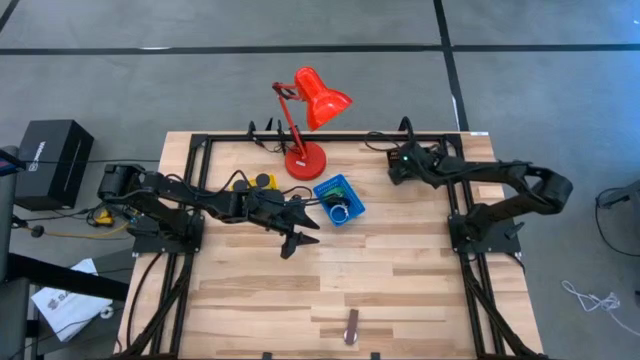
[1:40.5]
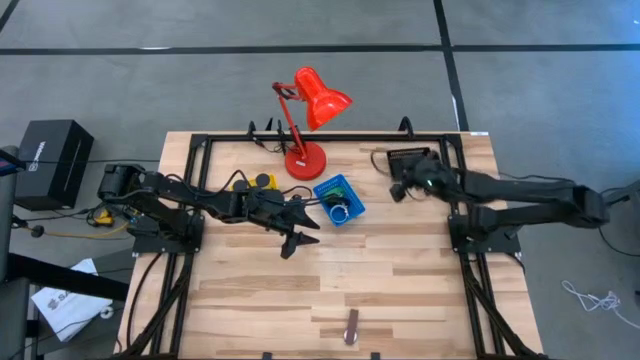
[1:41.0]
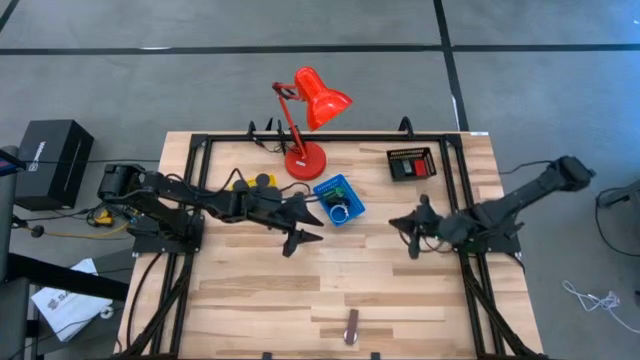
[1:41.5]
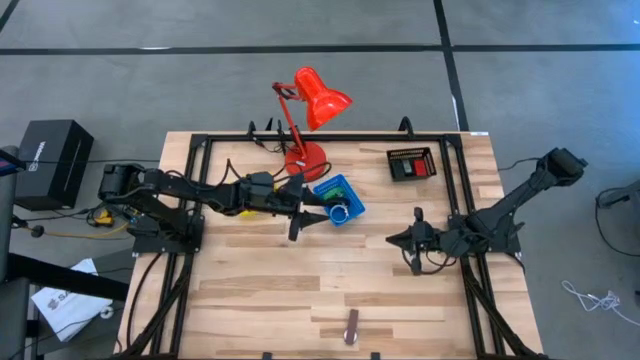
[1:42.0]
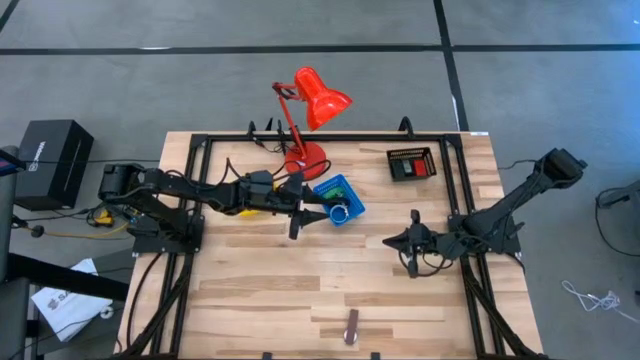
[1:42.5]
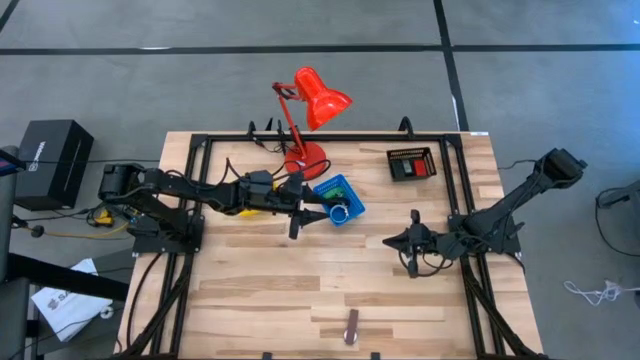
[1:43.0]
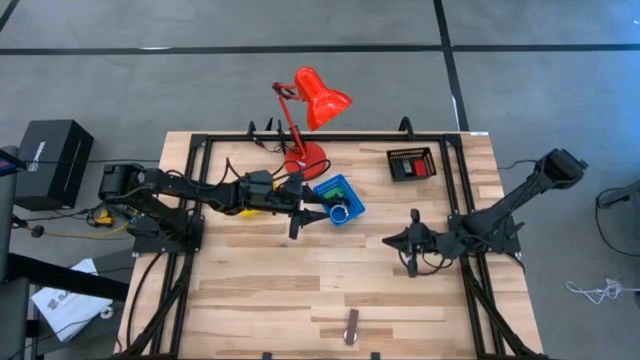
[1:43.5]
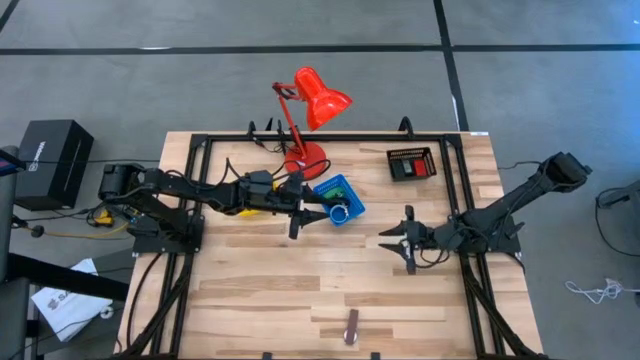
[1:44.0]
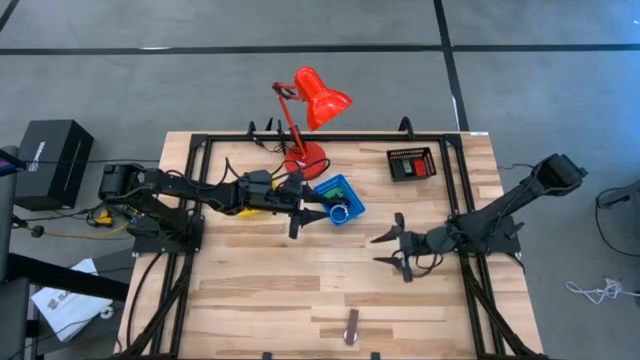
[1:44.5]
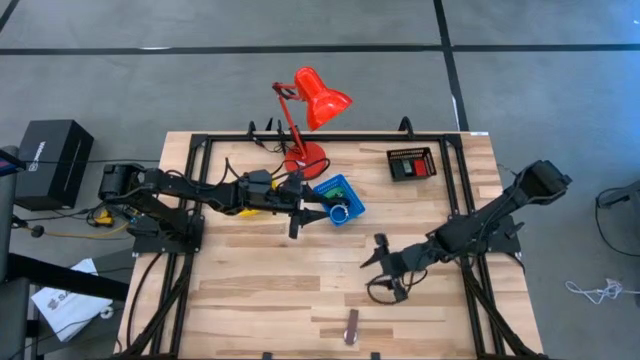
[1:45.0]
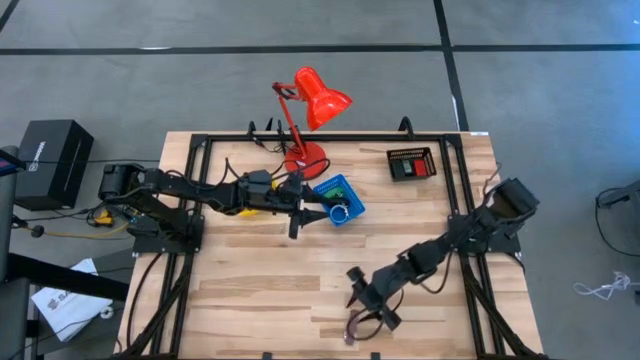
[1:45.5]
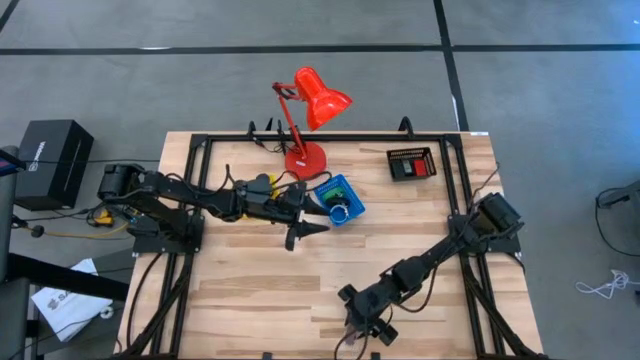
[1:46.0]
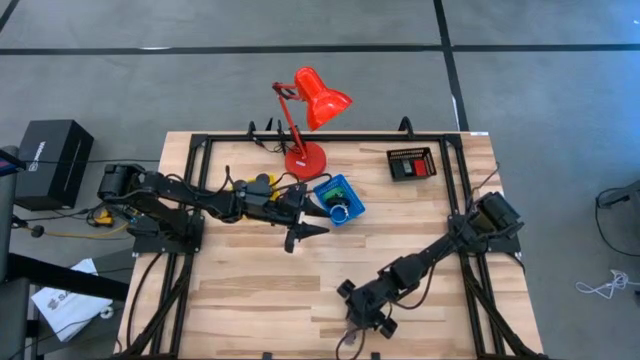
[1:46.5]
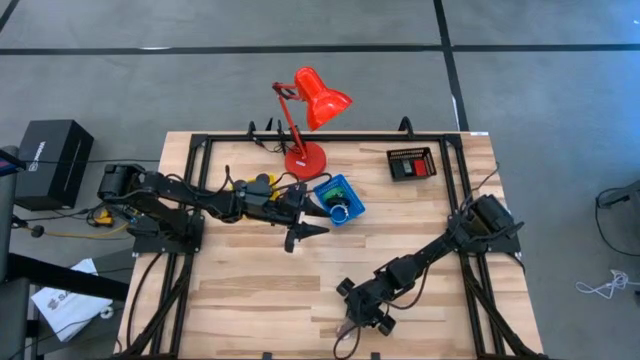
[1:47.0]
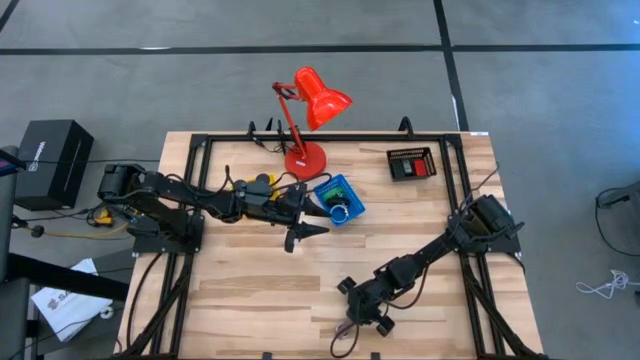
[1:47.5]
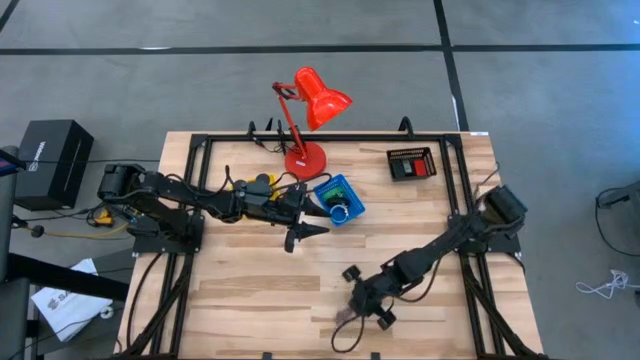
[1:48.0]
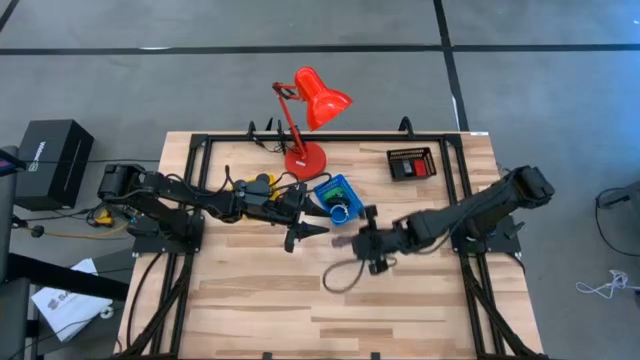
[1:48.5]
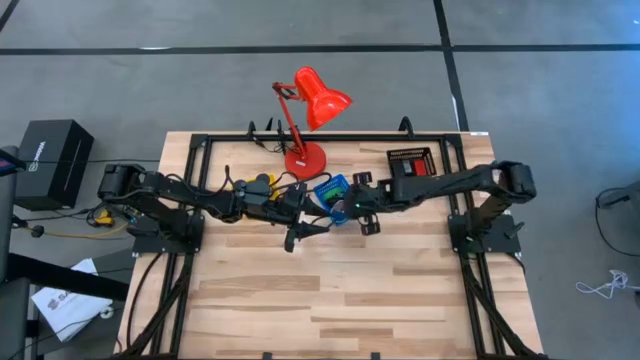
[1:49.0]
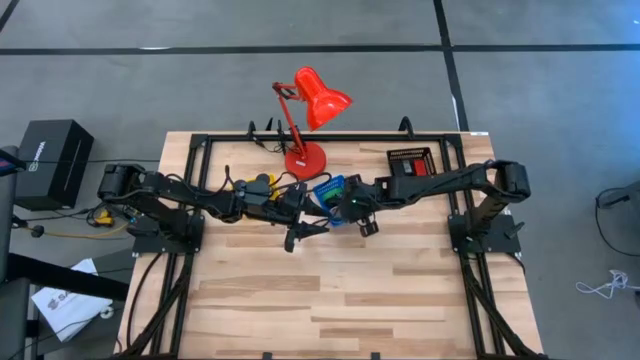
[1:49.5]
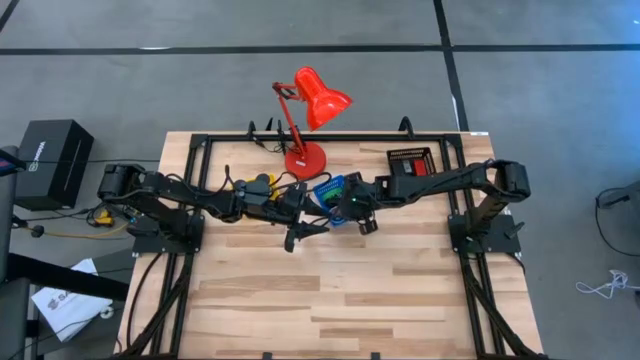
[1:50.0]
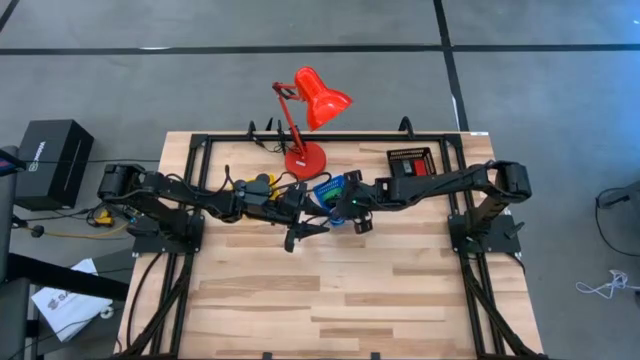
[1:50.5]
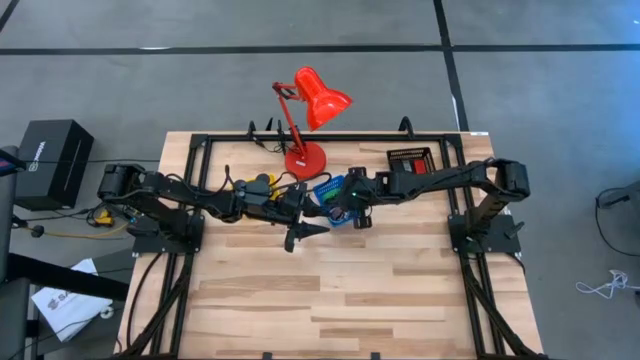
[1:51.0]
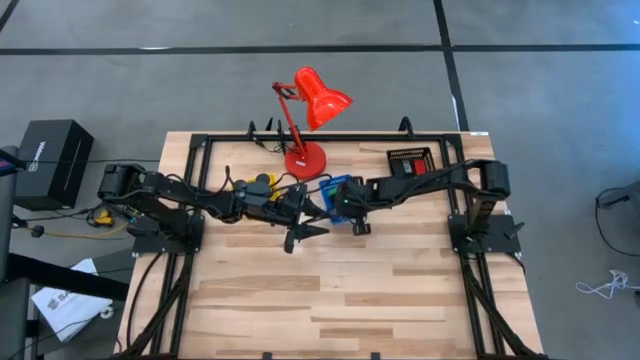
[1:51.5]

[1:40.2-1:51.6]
Task: Pick & Place Office items
Put the brown wristwatch into the blue bin

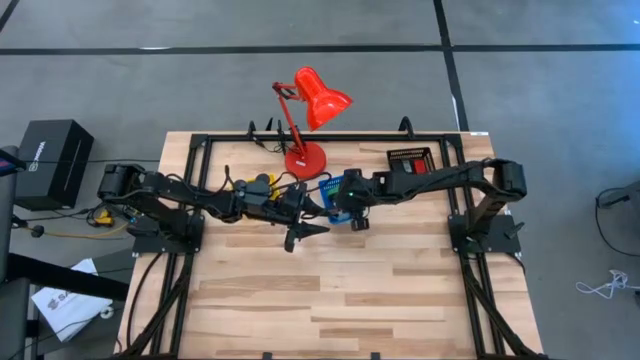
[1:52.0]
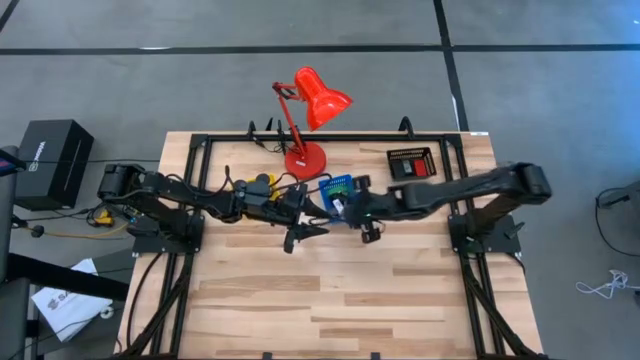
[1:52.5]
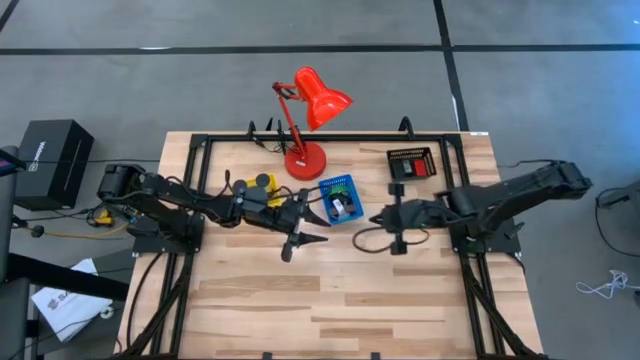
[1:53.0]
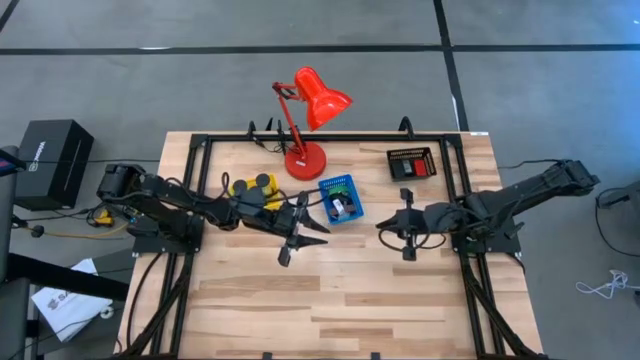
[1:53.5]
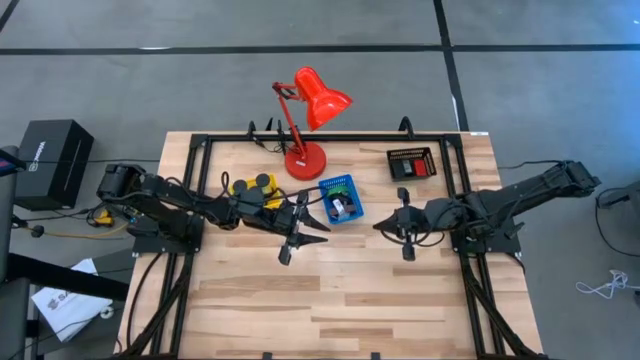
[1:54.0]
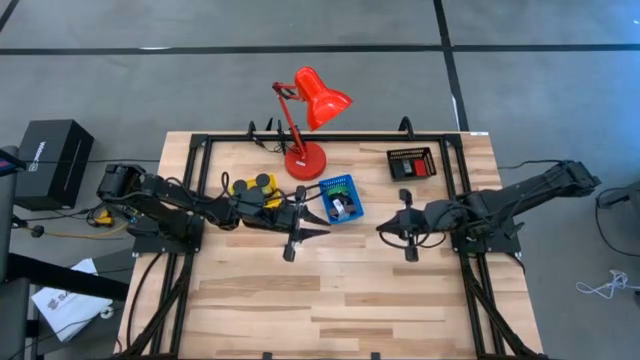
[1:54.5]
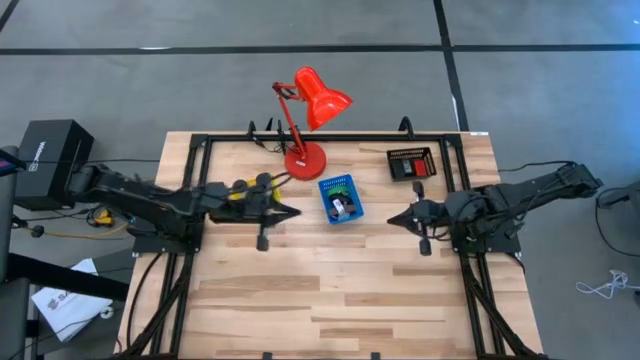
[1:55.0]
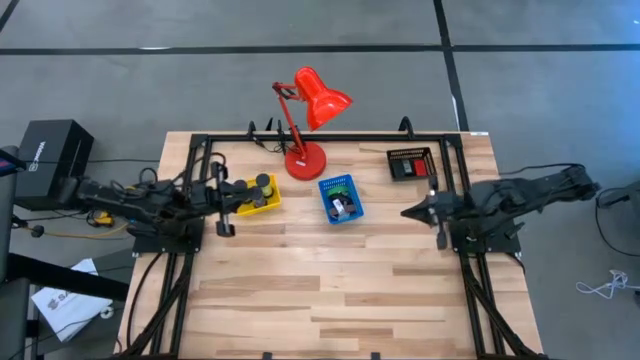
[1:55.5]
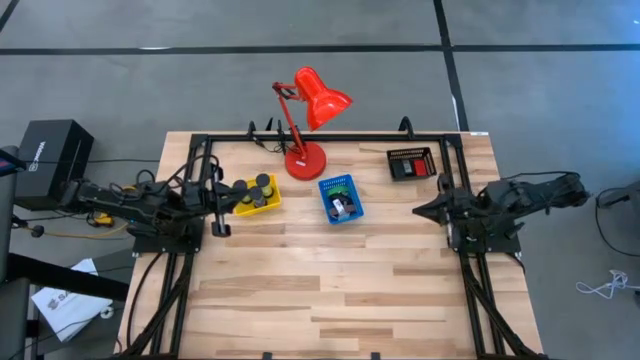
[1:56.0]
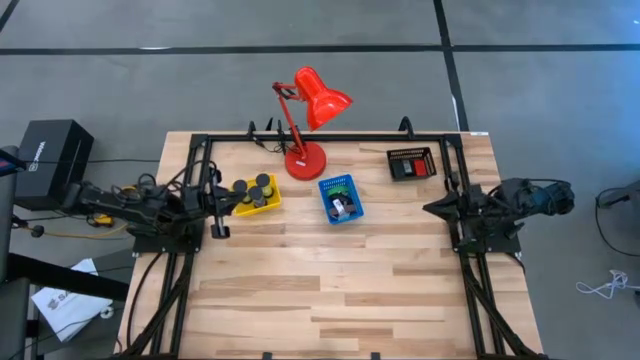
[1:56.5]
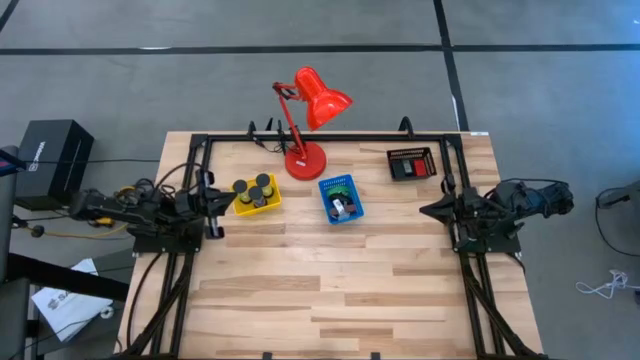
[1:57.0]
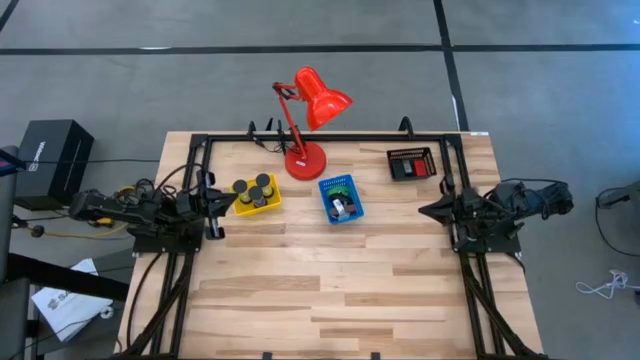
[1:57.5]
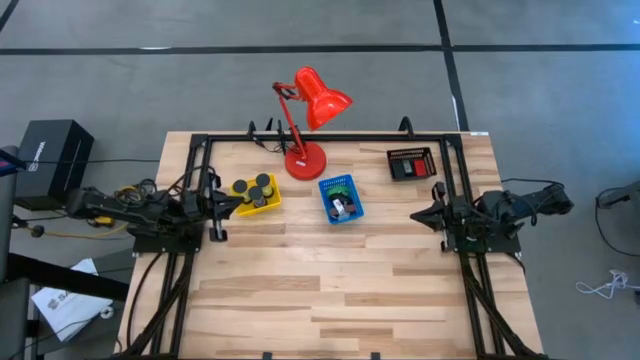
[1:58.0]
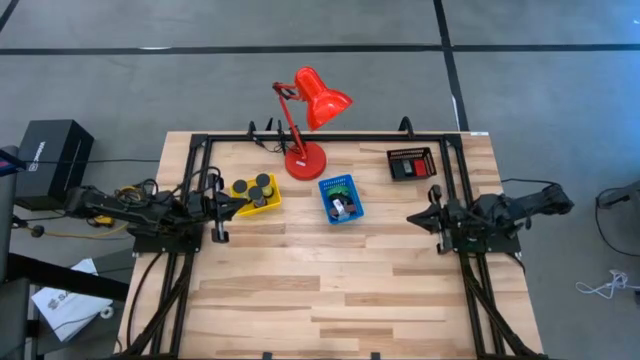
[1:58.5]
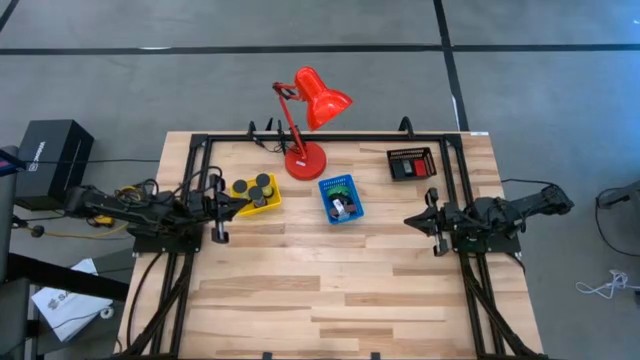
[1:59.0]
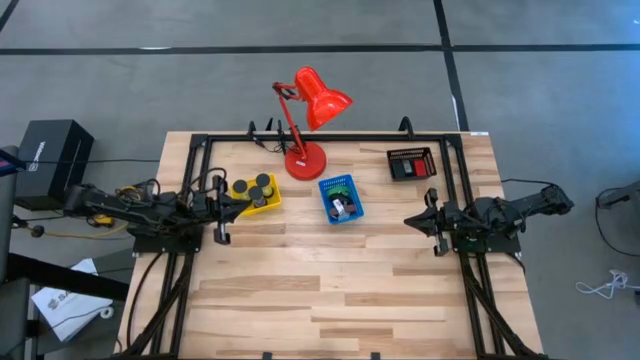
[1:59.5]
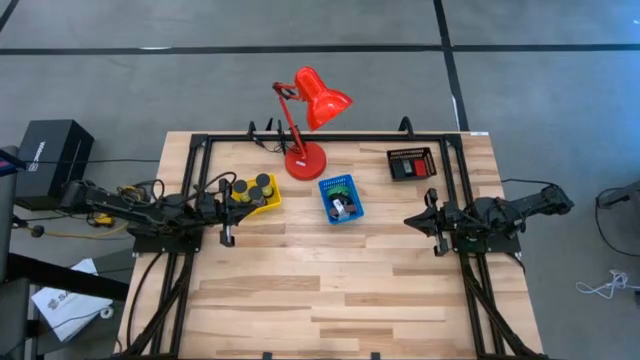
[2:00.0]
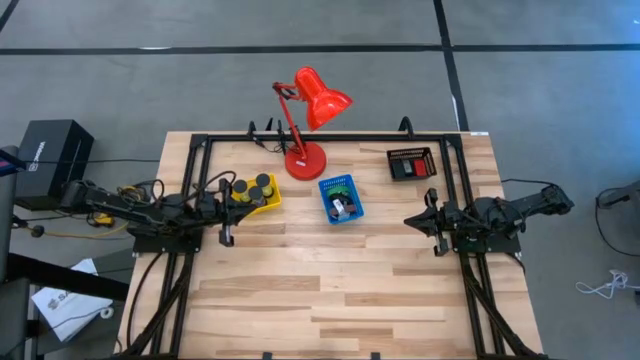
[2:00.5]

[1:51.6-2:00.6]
Return to Home Position
